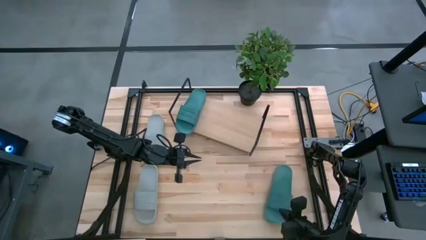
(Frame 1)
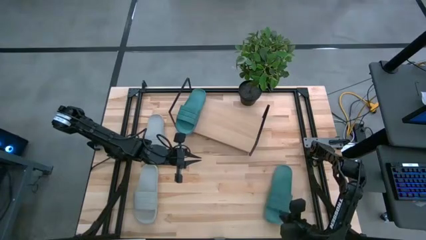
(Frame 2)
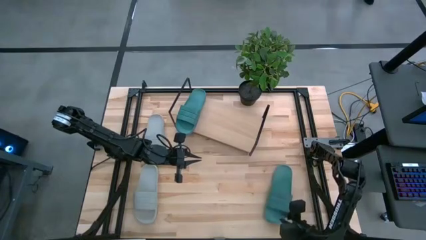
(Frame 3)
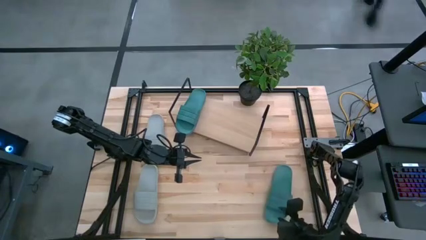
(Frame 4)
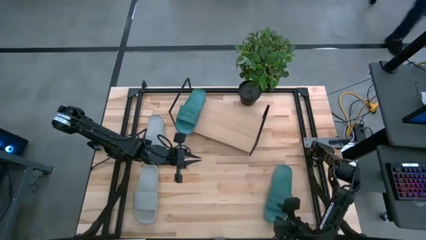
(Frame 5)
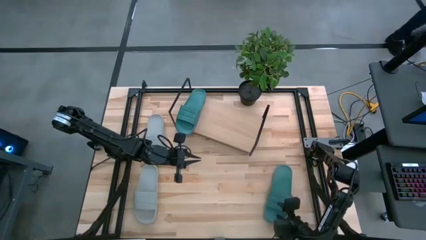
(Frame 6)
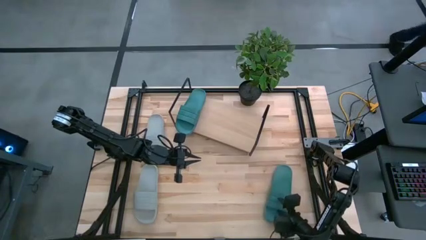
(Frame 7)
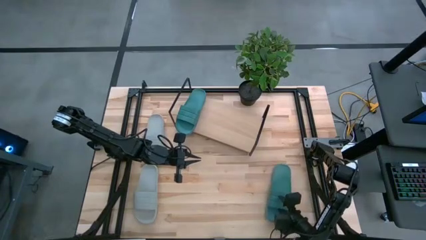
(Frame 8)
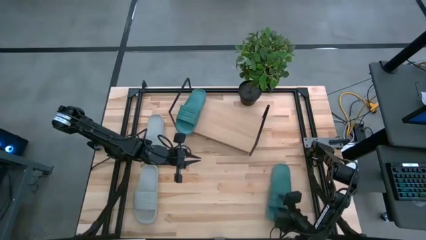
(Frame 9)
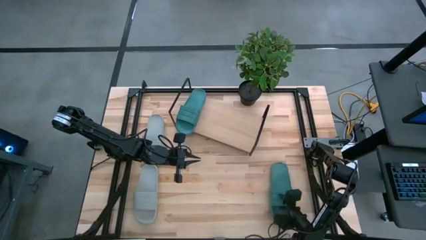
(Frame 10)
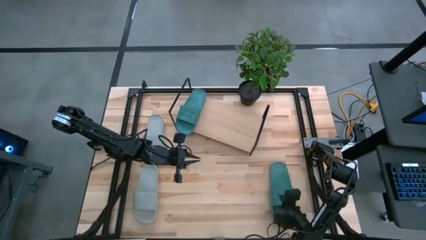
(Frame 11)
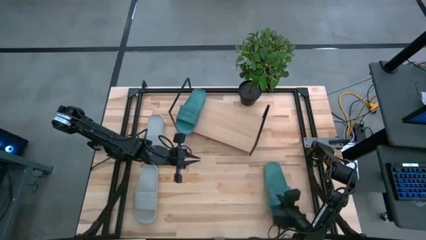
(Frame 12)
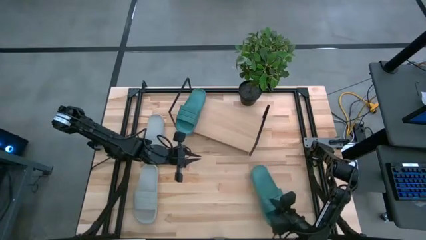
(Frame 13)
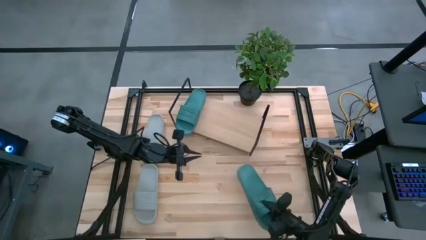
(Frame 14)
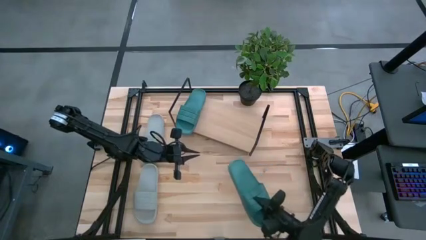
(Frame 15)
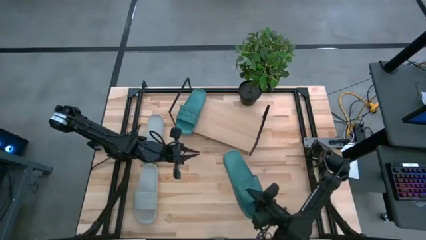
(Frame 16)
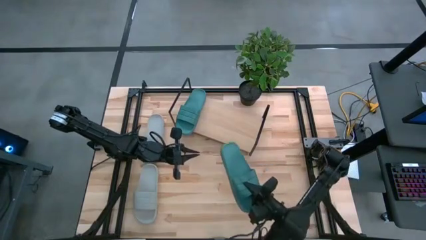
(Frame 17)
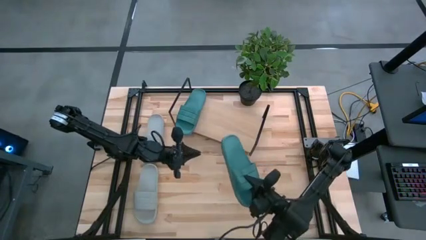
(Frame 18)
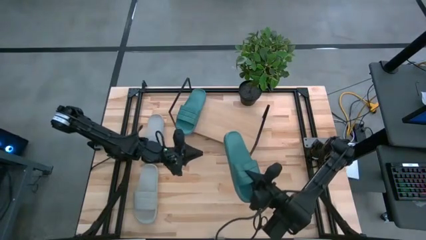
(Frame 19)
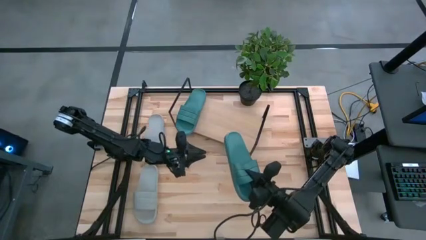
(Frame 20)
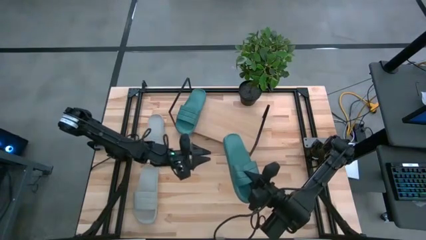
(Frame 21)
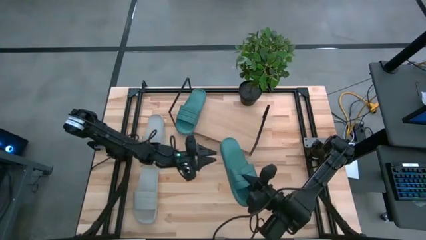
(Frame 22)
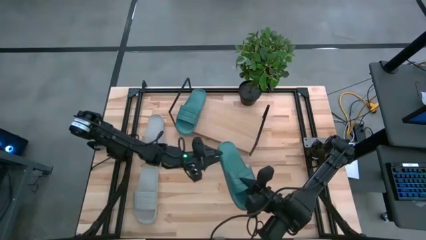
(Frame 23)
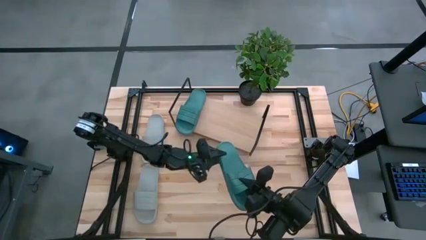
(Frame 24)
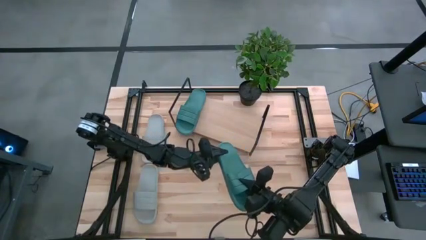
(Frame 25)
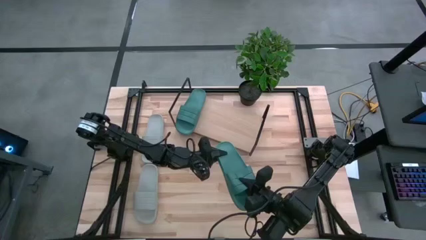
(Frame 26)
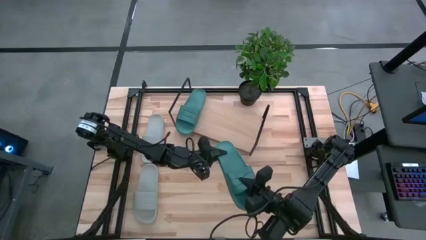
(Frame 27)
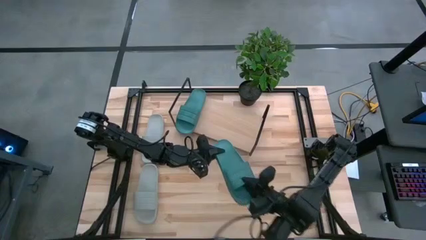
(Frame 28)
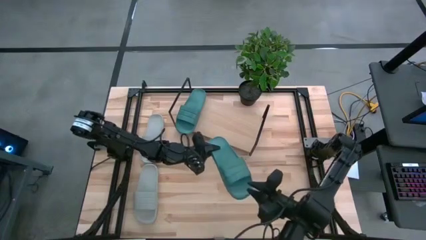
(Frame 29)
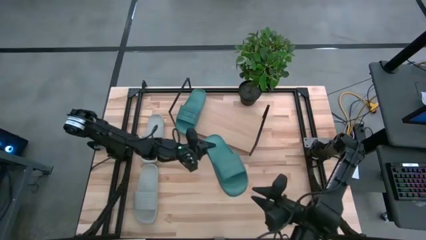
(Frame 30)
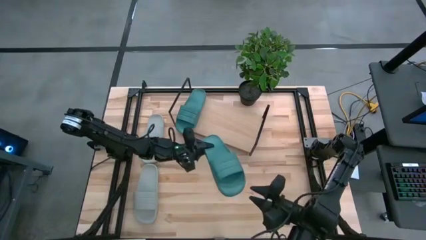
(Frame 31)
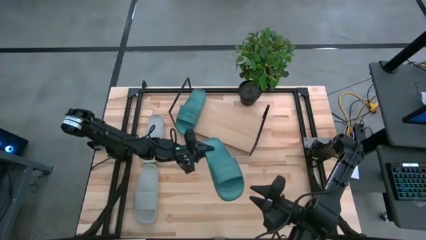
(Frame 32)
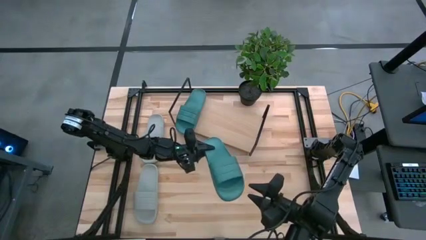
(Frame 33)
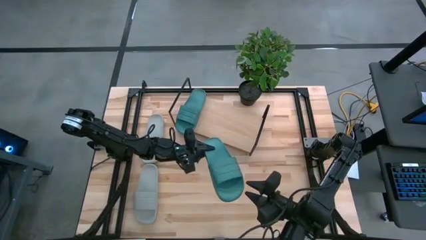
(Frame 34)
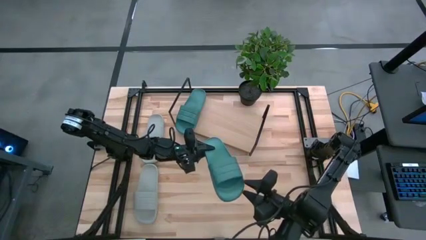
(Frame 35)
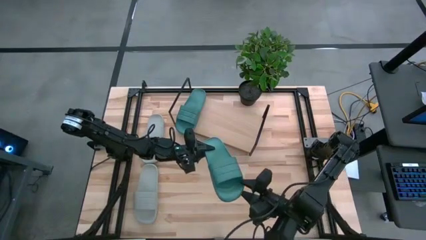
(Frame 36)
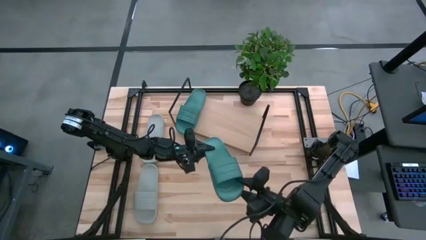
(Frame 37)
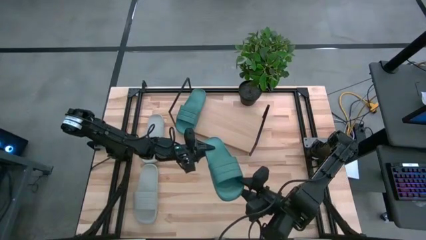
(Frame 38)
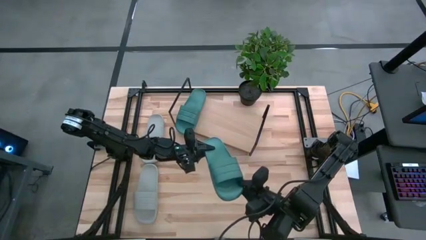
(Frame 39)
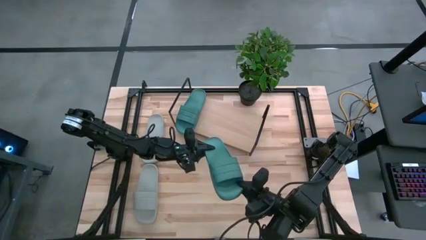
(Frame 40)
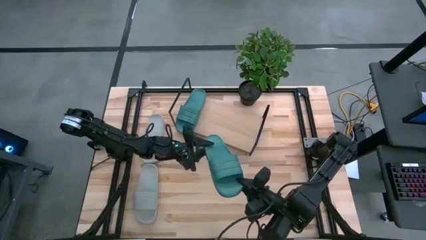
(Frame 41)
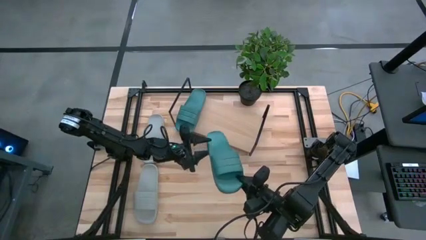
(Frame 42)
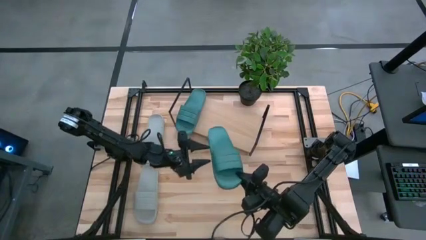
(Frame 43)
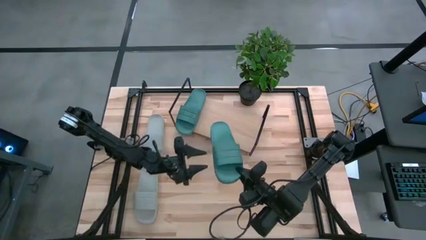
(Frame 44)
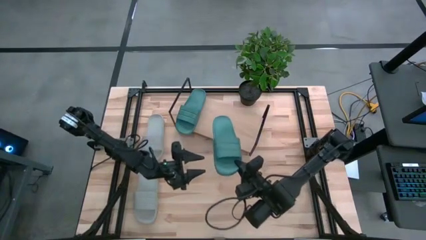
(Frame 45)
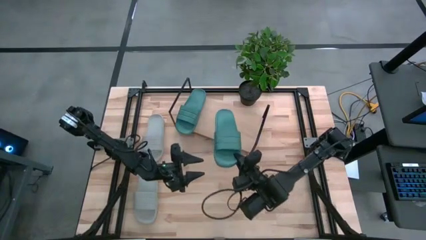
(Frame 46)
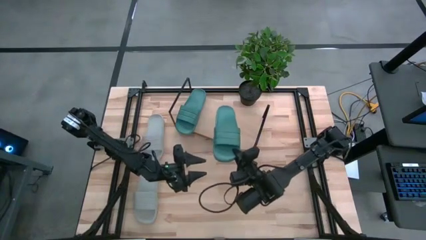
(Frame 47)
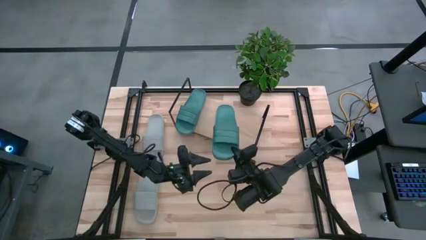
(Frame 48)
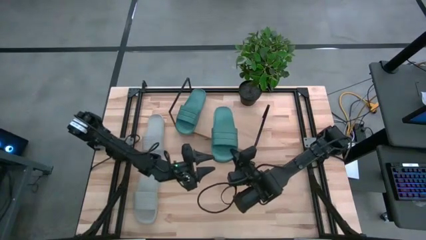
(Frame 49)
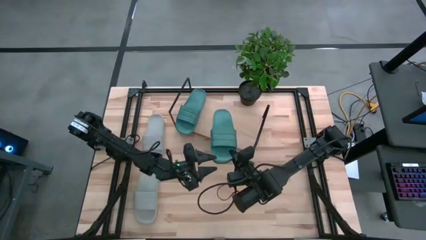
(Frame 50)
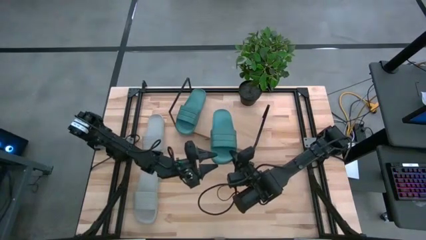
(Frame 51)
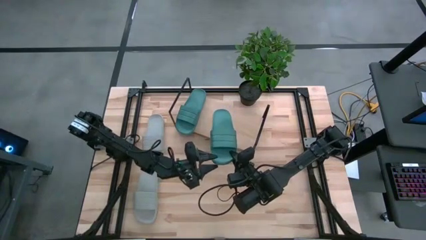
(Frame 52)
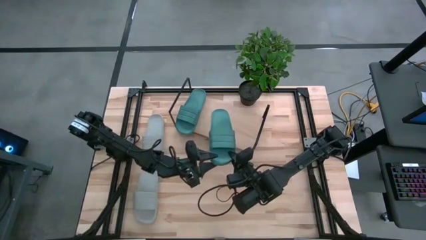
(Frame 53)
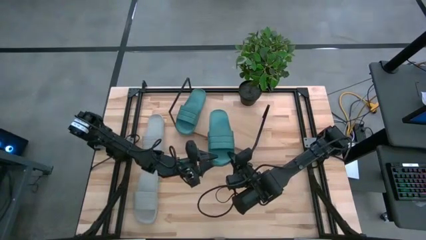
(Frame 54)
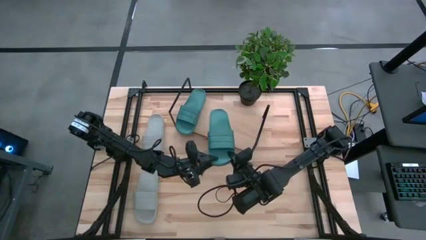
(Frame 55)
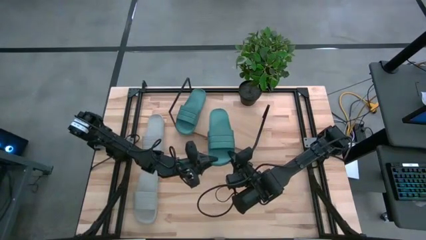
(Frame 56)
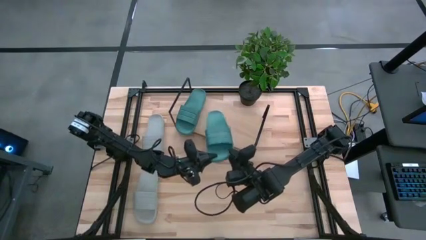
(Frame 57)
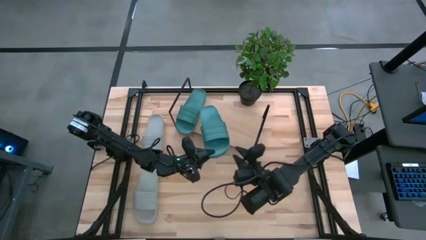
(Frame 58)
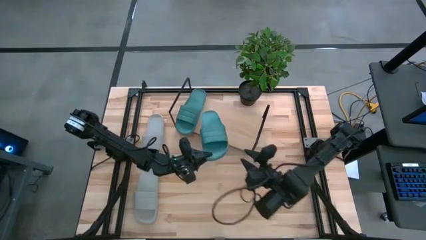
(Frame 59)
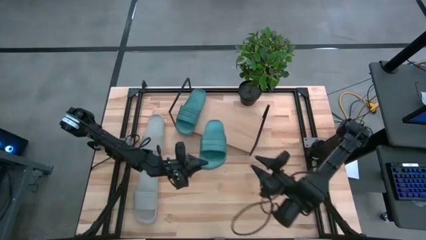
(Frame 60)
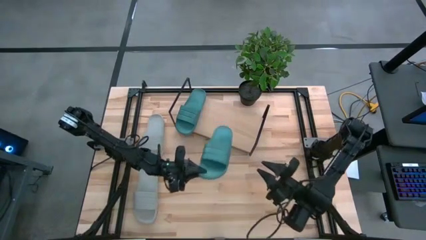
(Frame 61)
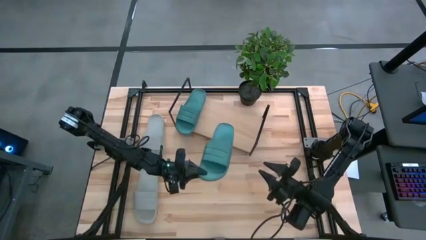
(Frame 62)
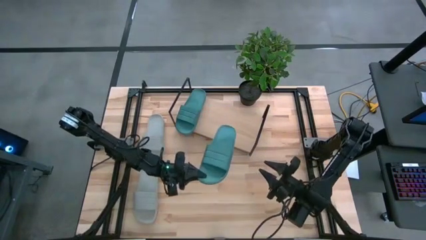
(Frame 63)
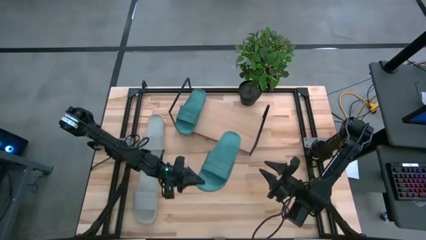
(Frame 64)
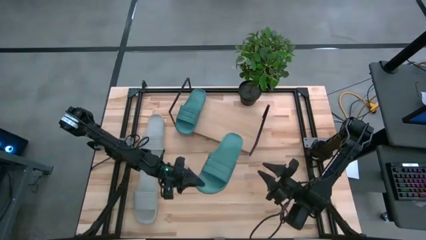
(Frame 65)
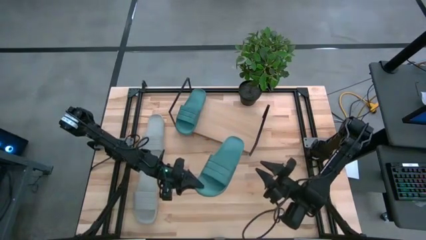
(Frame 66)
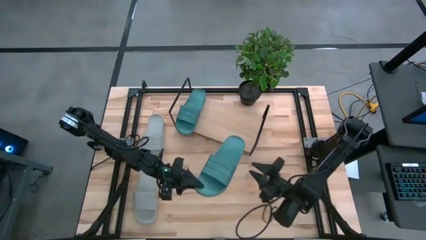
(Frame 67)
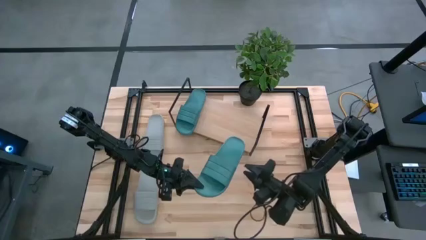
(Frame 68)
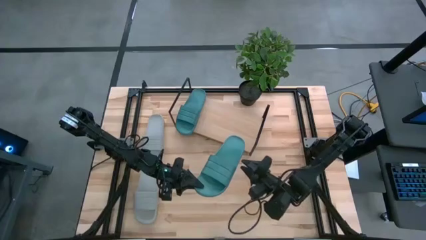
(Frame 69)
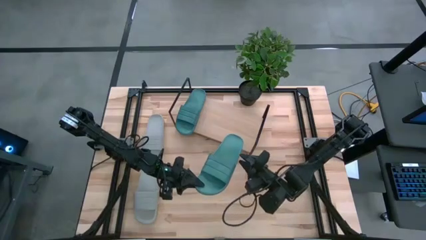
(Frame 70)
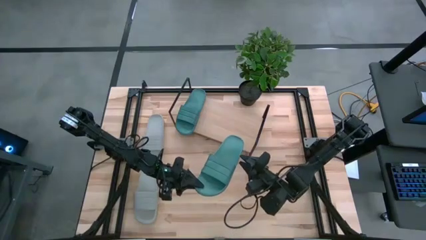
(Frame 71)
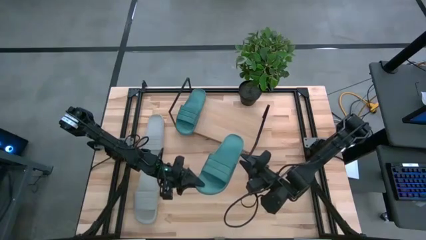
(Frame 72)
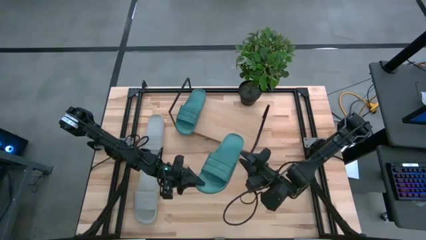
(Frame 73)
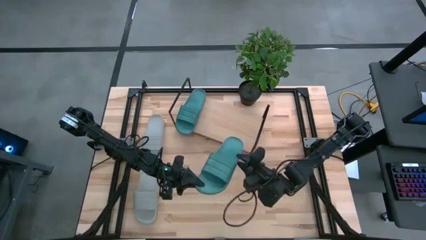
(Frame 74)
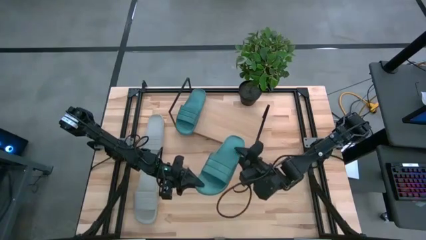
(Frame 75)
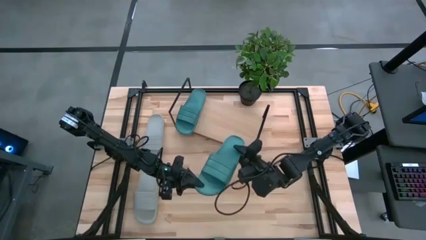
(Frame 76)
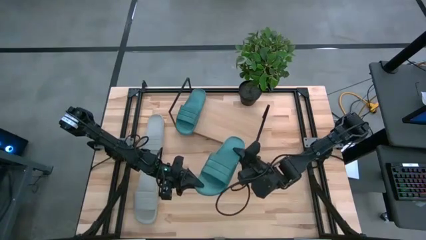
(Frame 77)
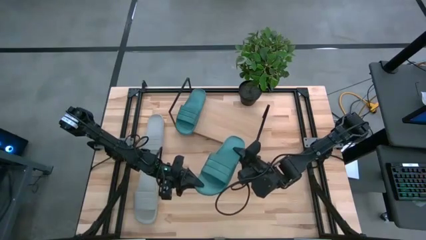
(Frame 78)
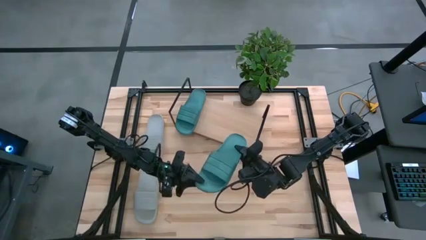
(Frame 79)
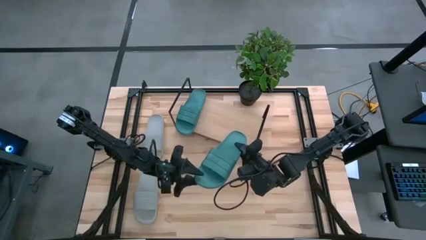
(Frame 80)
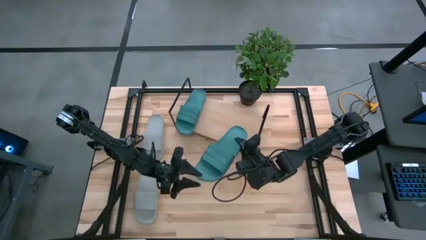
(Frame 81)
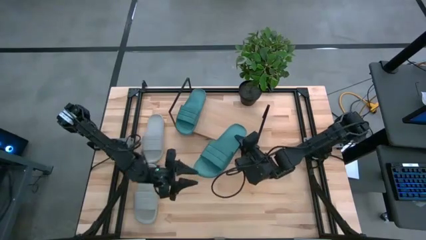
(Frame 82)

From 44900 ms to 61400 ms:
Task: Pick and place slides into the shelf
Put the green slipper on the shelf
